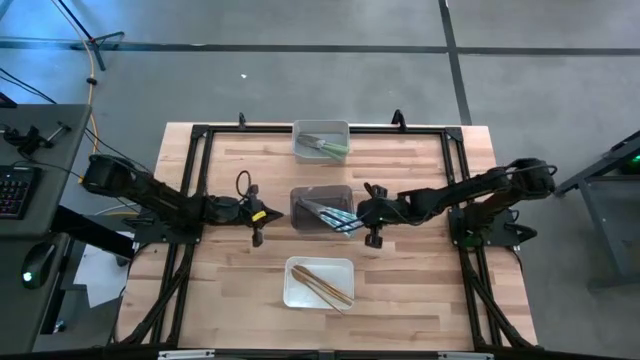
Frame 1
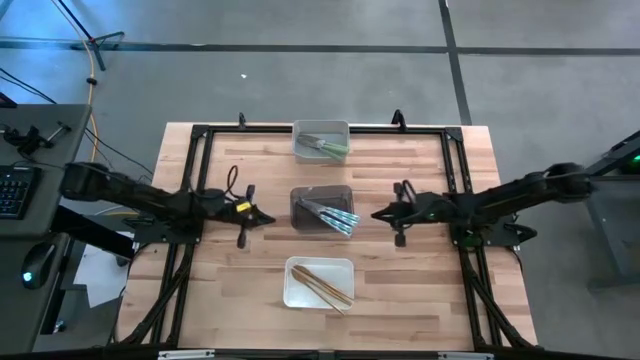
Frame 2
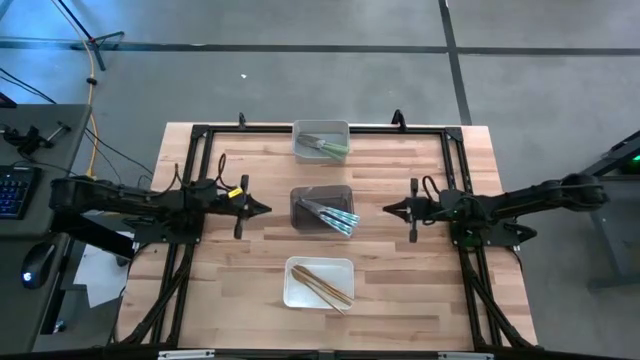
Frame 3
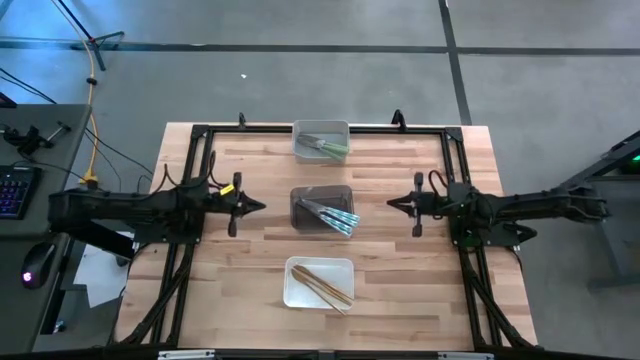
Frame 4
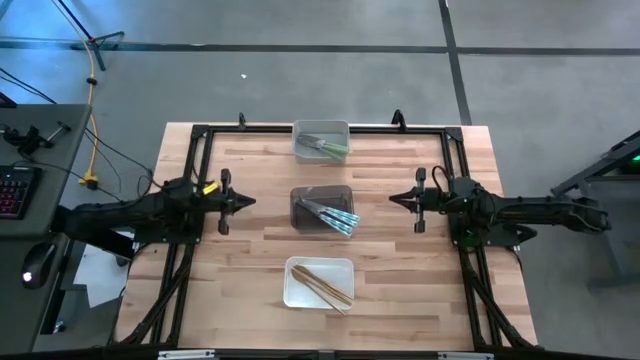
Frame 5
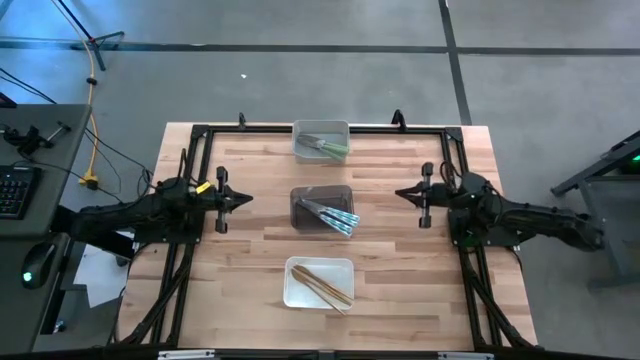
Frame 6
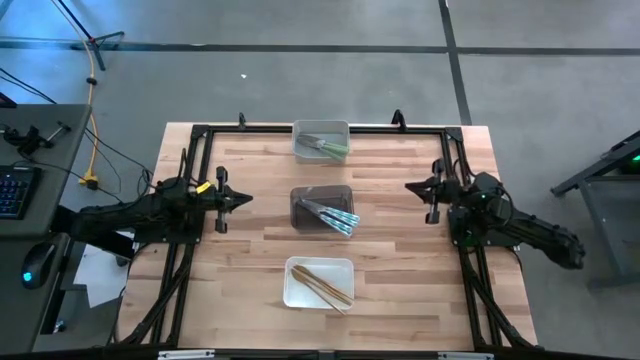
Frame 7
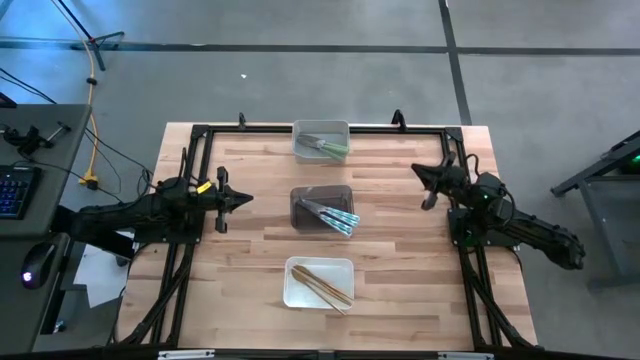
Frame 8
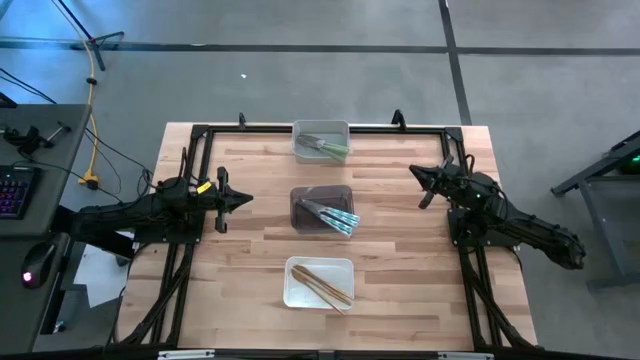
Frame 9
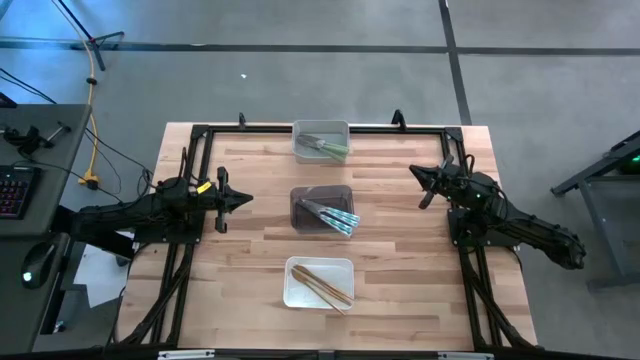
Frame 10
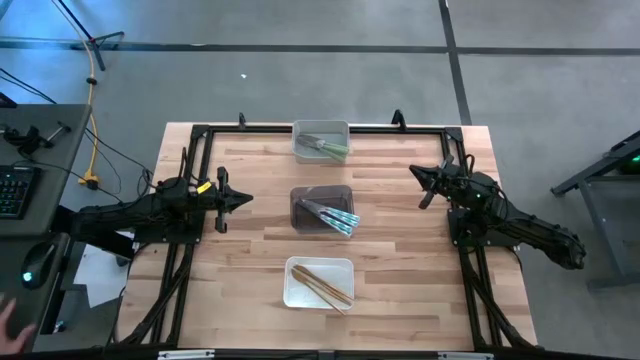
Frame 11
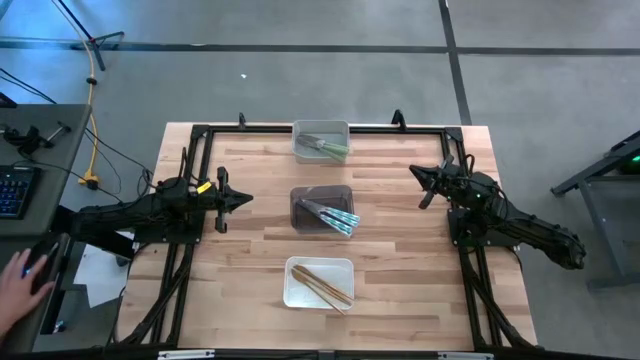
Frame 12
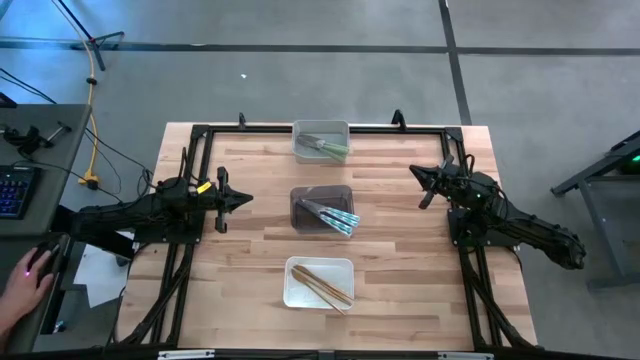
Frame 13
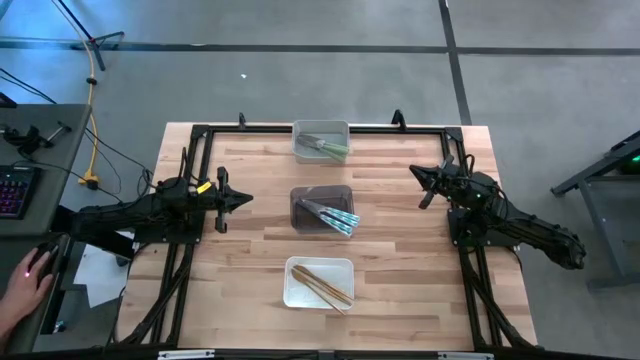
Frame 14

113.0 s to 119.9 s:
Task: Sort silverware by color (type)
Return to Home Position
